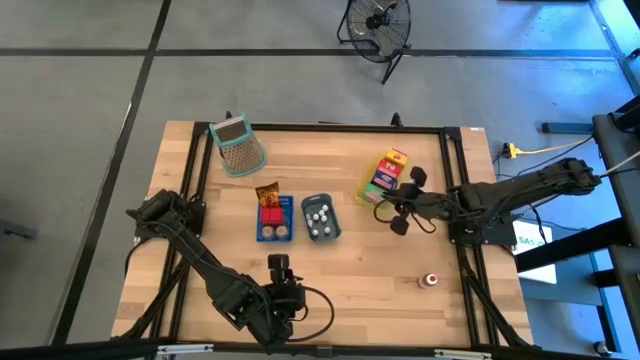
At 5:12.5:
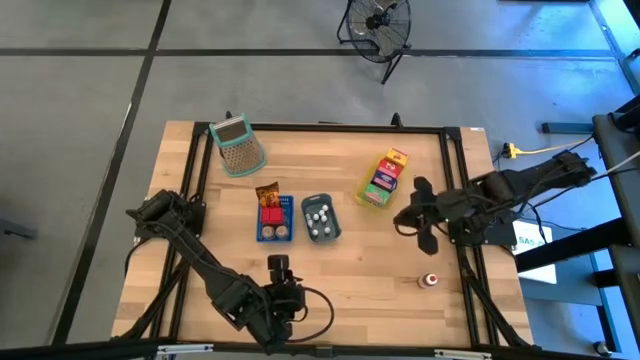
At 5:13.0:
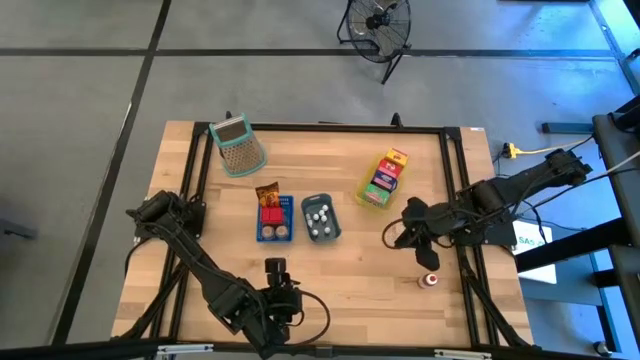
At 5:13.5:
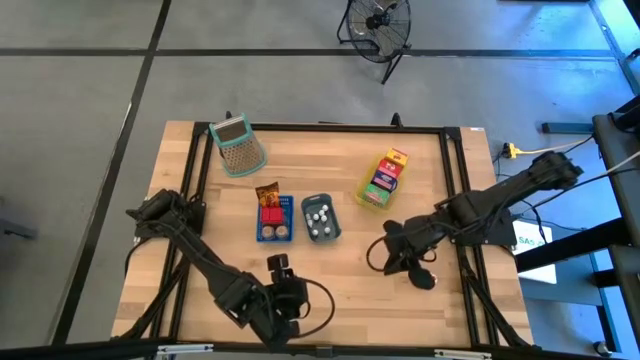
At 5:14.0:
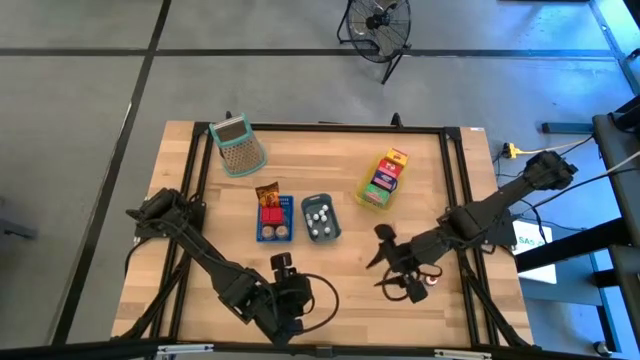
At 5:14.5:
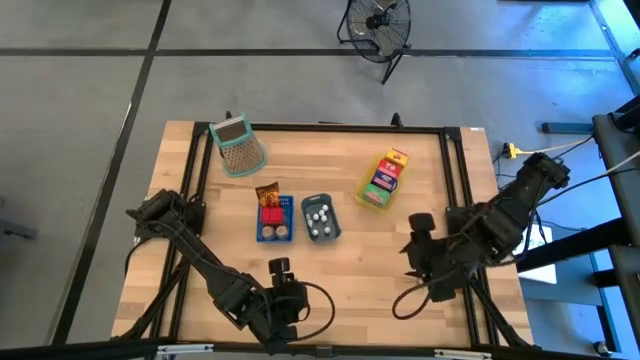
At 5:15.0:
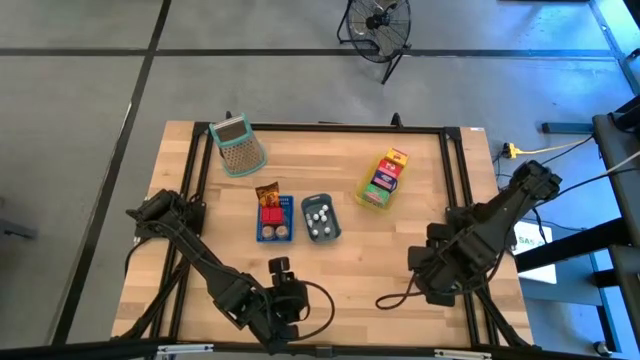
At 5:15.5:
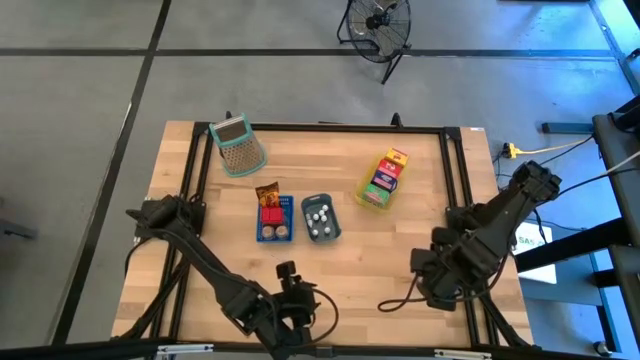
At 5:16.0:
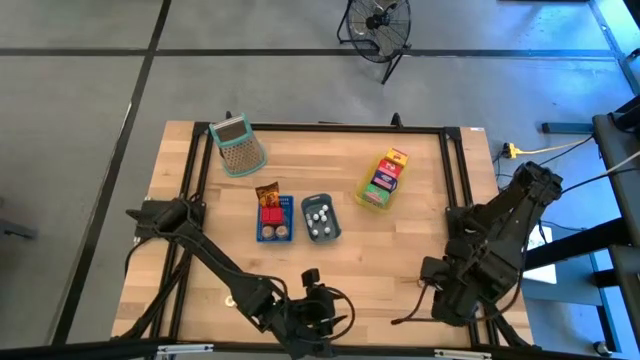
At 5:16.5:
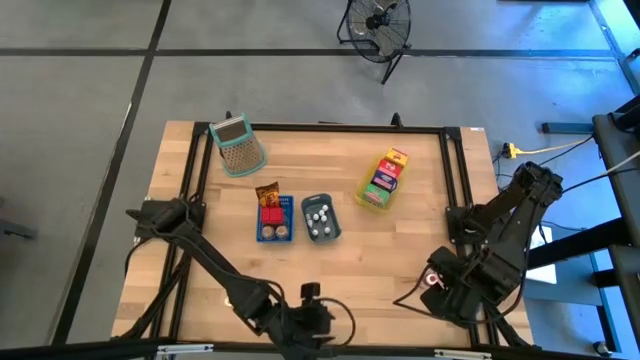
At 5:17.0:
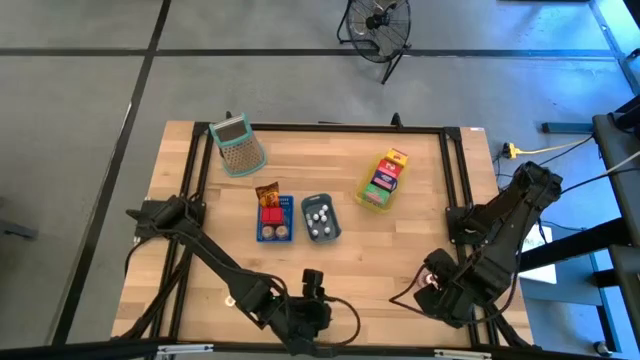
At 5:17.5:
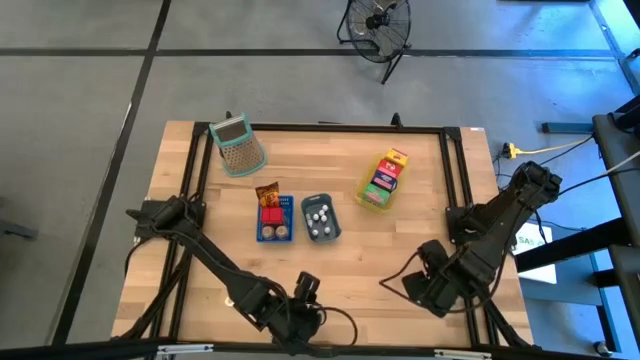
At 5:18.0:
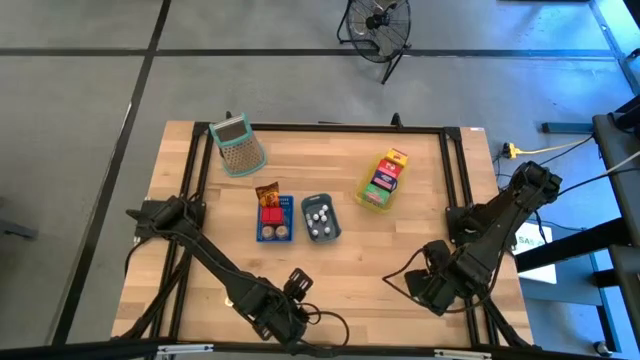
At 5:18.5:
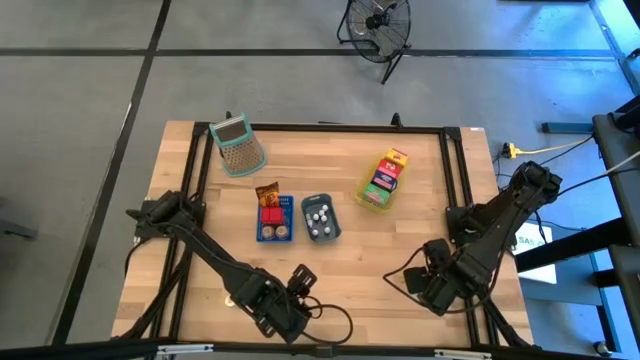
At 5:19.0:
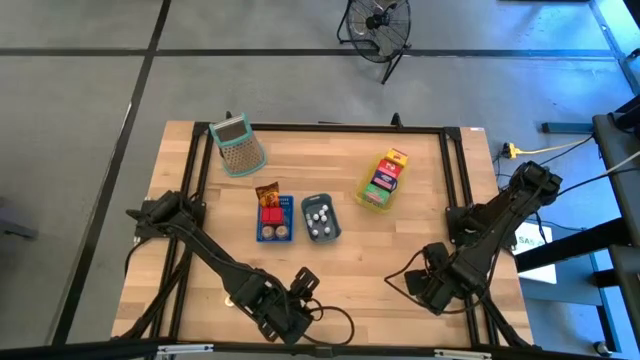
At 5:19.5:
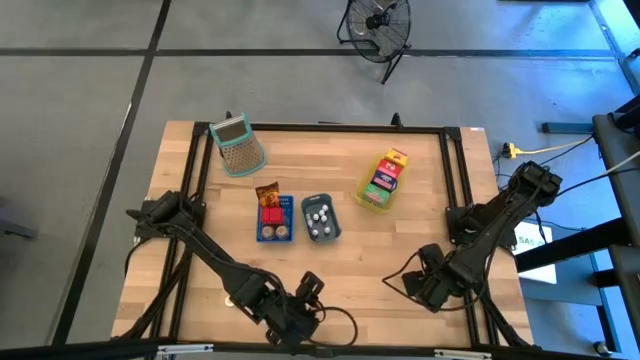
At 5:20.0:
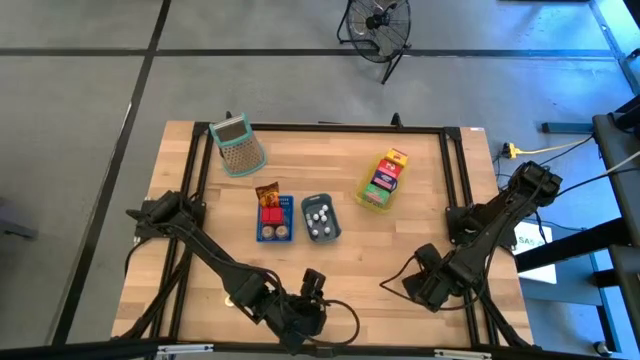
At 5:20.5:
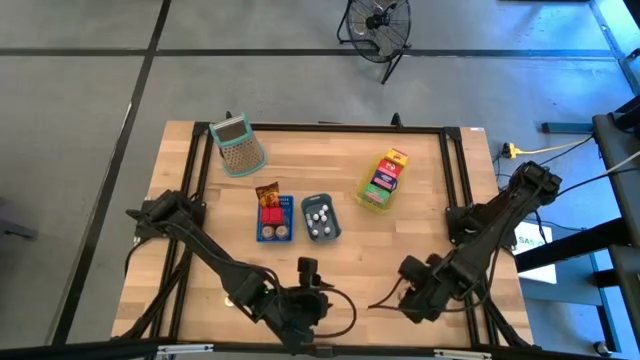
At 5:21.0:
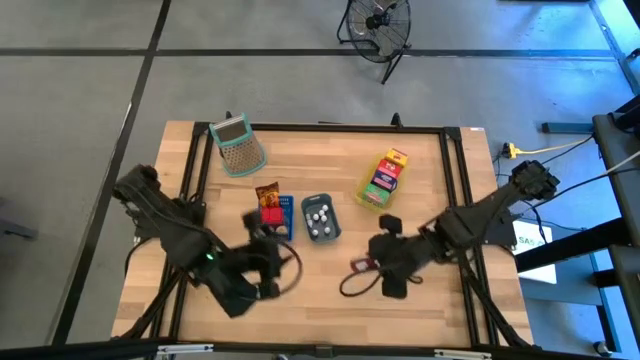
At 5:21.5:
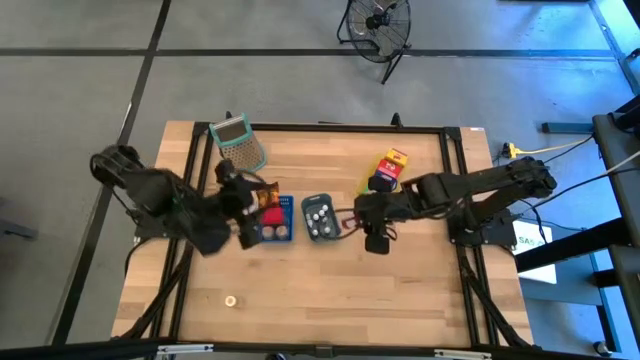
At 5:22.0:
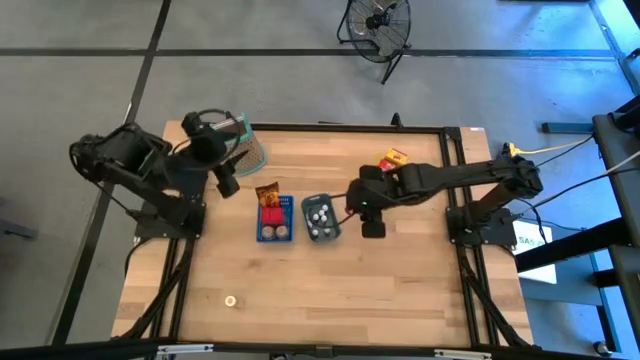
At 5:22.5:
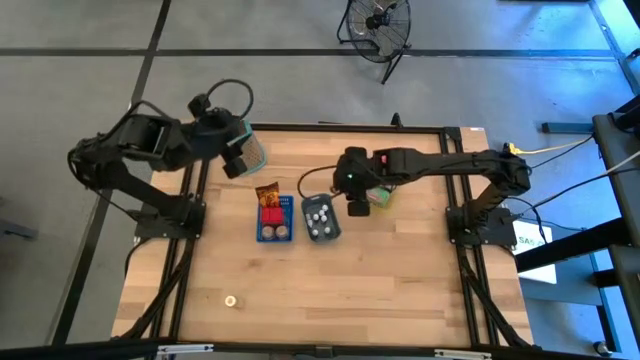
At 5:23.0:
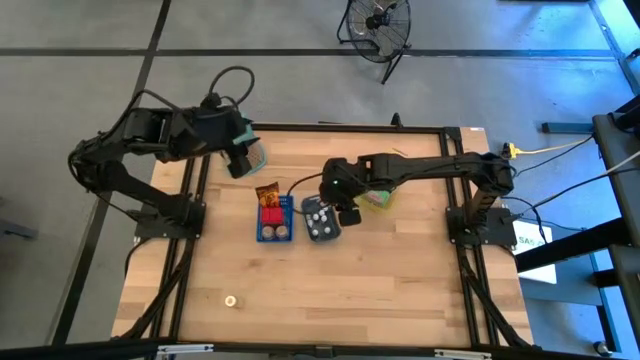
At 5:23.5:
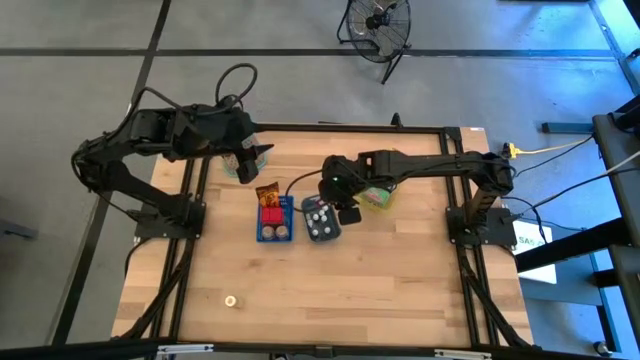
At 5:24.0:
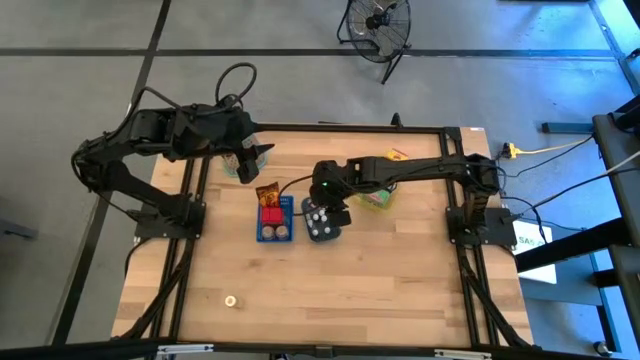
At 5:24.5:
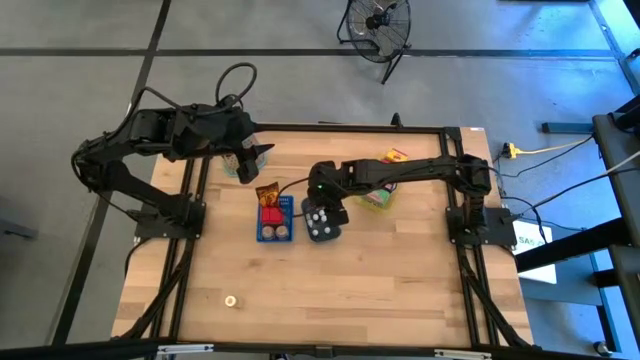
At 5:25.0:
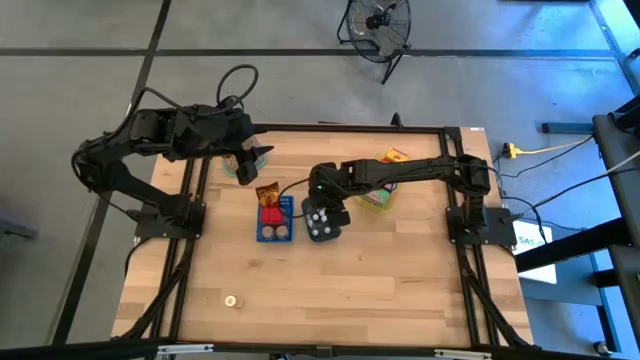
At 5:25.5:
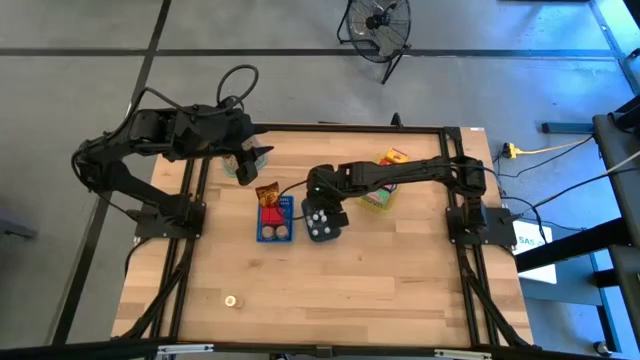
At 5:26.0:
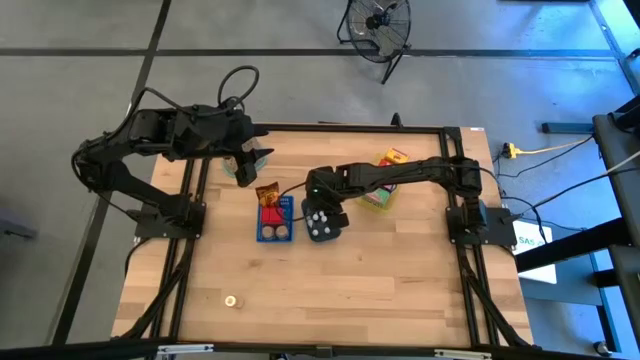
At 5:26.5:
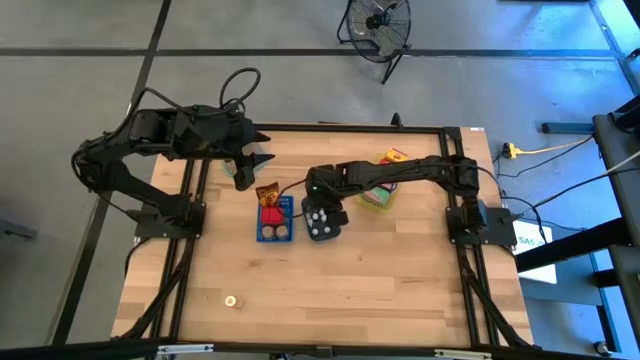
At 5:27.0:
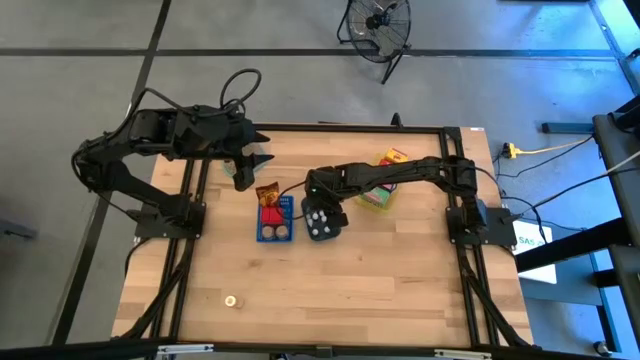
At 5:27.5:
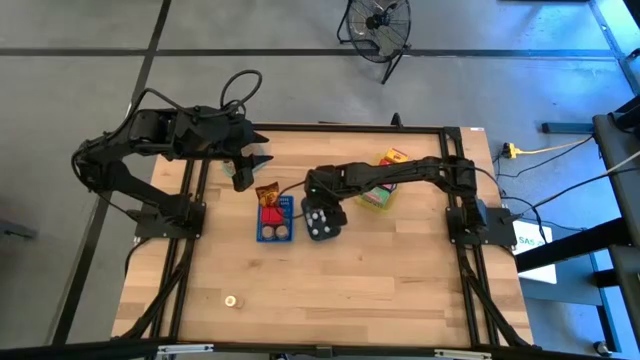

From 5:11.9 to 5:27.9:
Task: Pick & Place Kitchen Items
Put the red food coloring bottle into the gray bin

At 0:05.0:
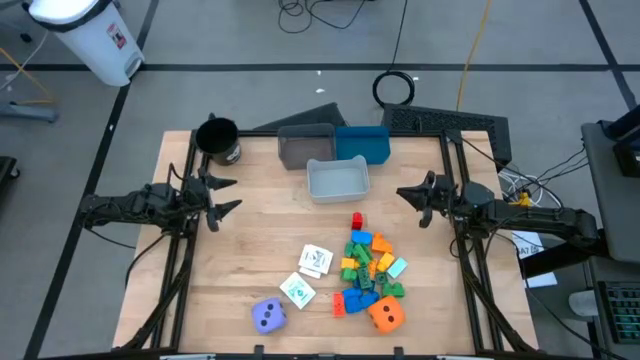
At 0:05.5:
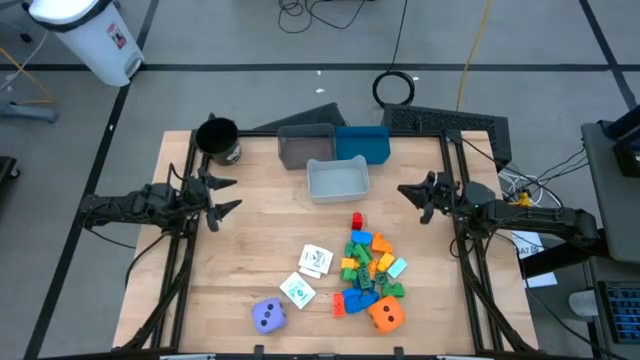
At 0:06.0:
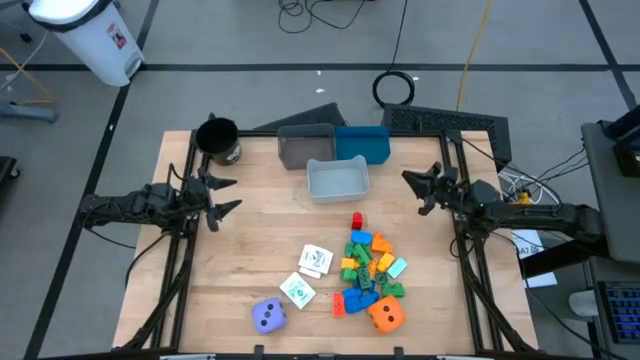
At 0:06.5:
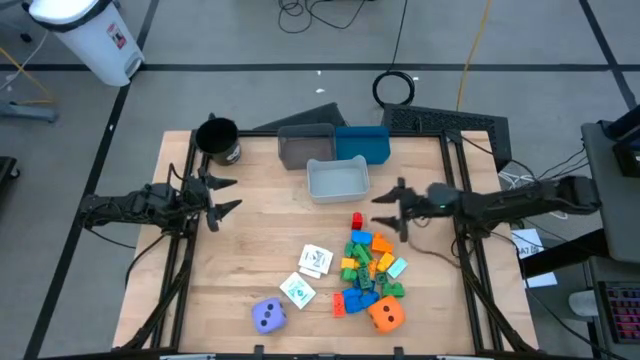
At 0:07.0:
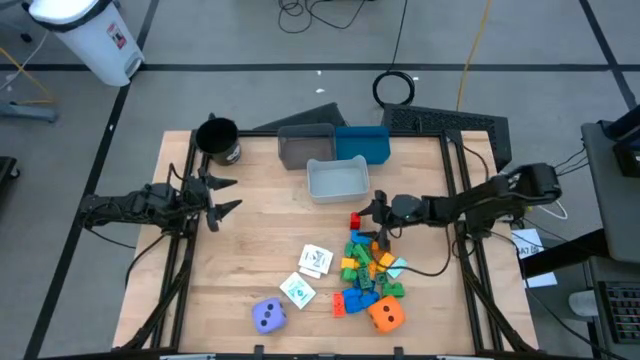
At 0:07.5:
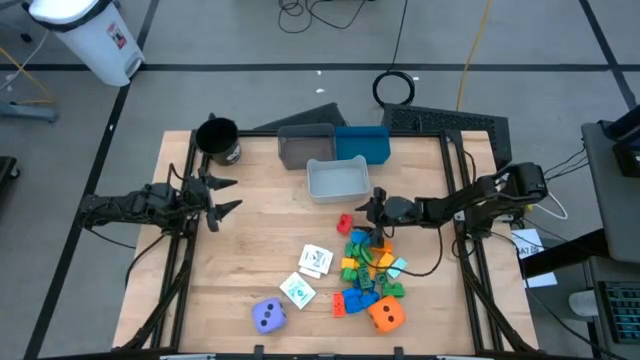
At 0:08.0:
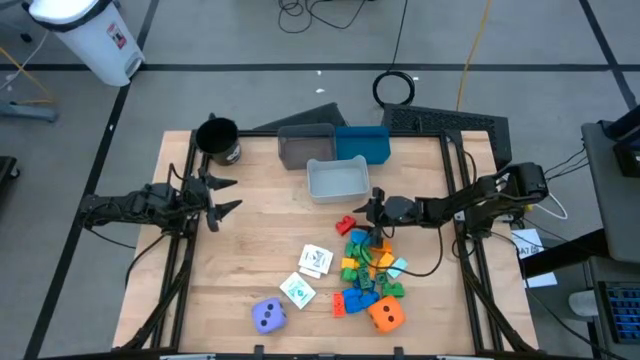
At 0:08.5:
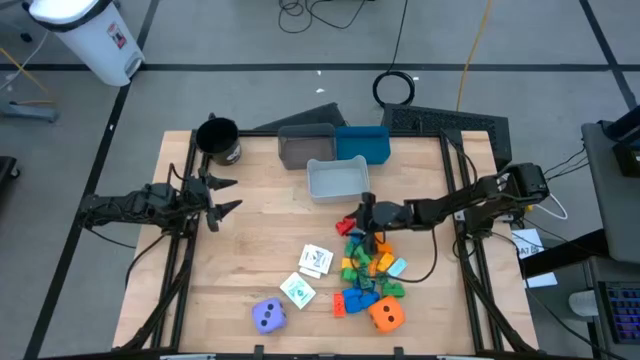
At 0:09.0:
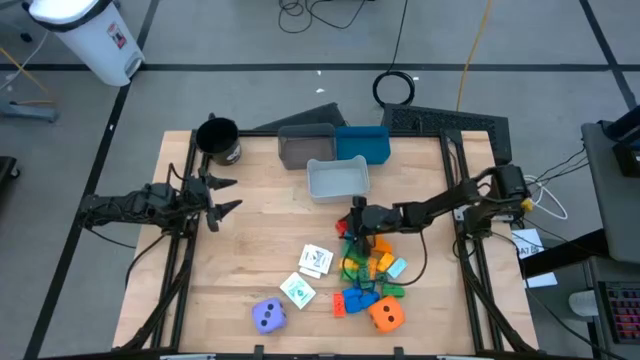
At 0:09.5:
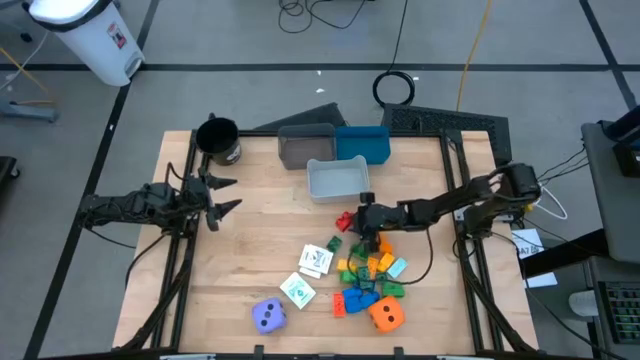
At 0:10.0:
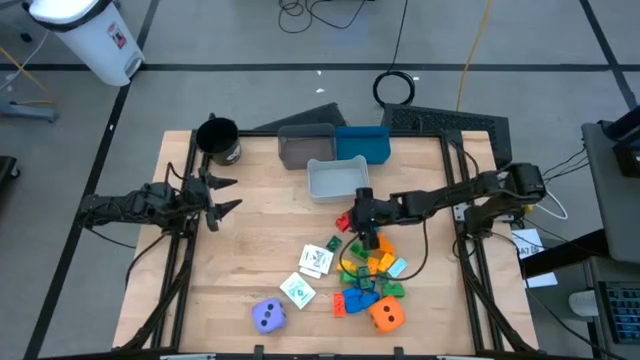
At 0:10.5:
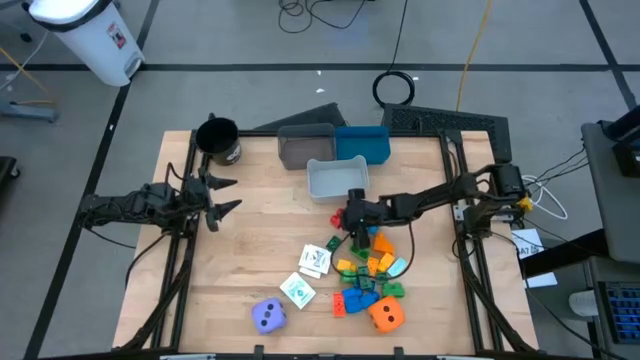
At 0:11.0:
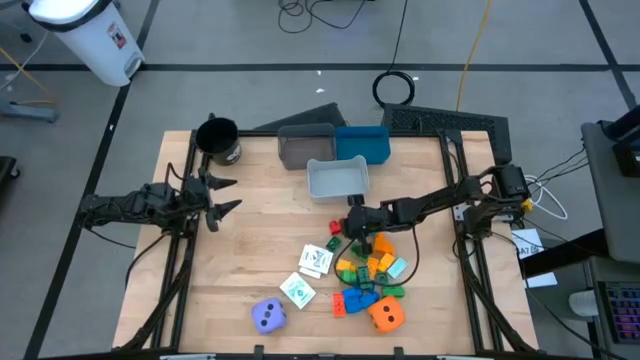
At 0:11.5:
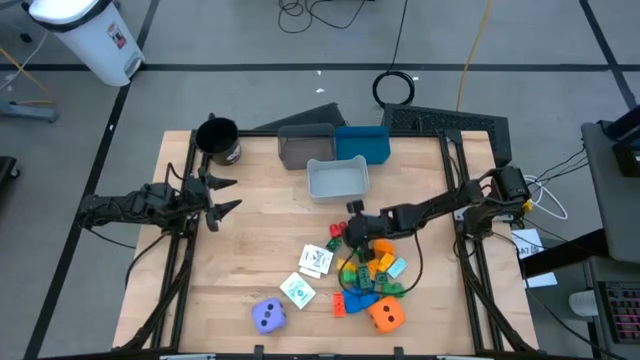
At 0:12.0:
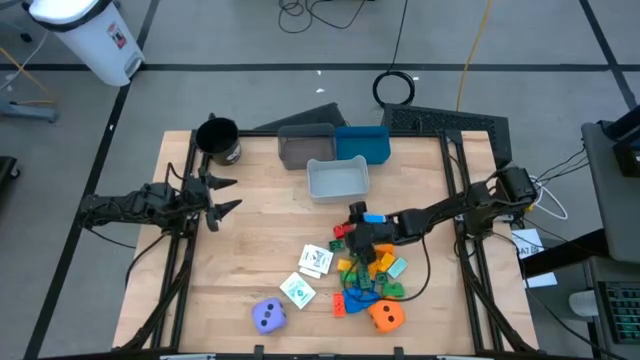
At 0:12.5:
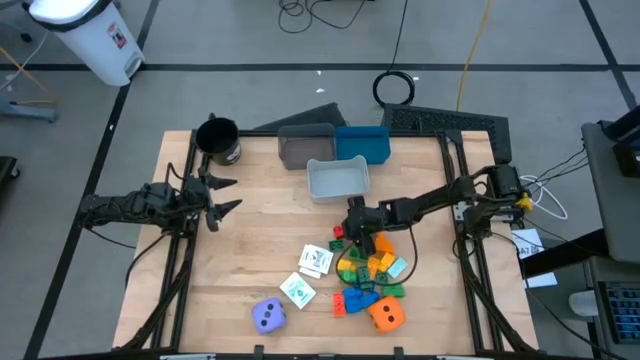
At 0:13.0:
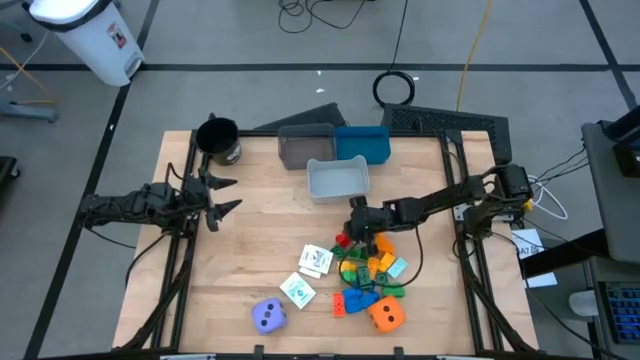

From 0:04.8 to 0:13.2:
Task: Pick & Place Toys
Put the red game piece into the gray bin
